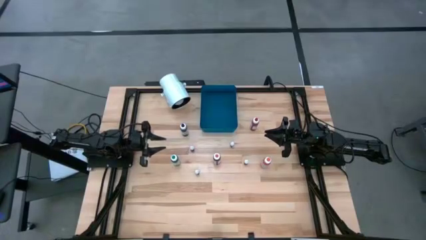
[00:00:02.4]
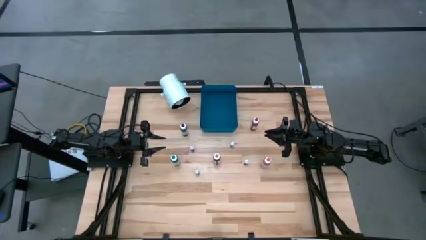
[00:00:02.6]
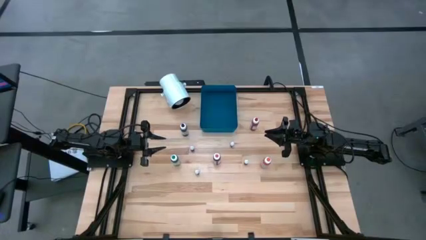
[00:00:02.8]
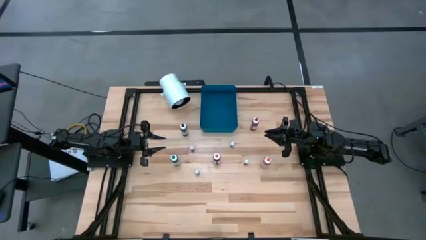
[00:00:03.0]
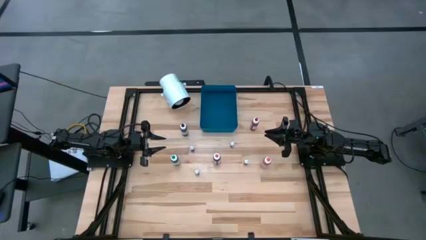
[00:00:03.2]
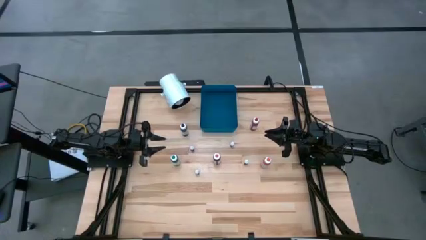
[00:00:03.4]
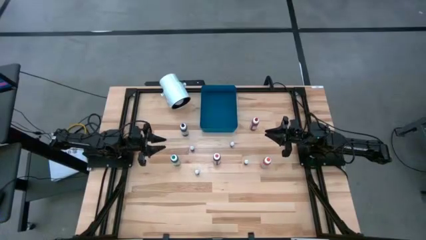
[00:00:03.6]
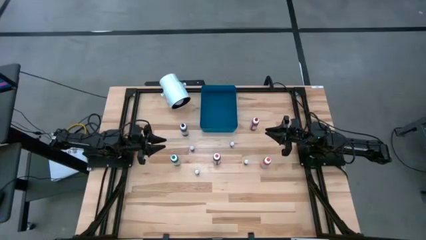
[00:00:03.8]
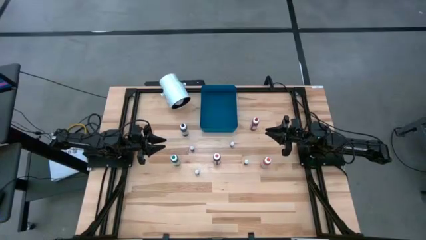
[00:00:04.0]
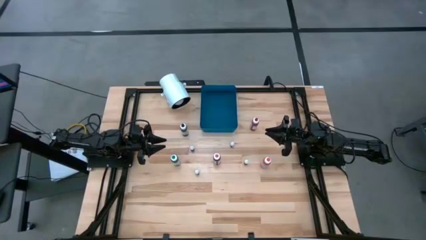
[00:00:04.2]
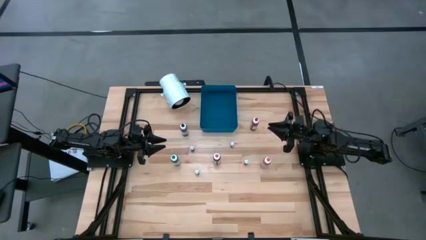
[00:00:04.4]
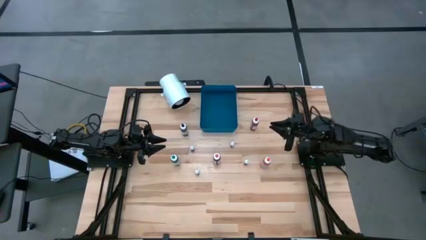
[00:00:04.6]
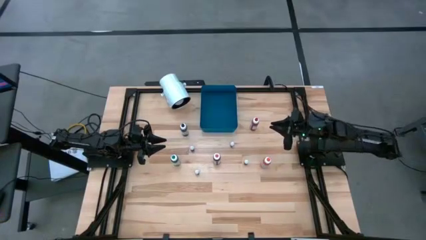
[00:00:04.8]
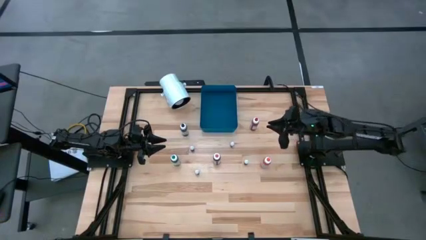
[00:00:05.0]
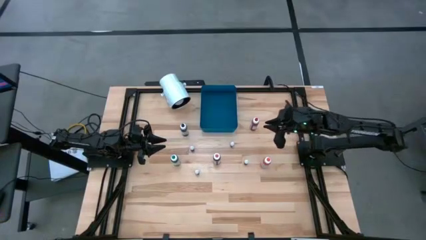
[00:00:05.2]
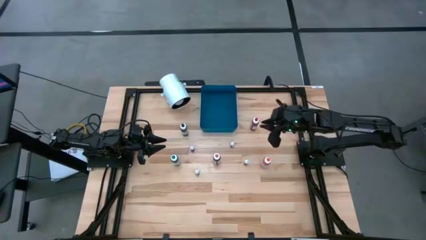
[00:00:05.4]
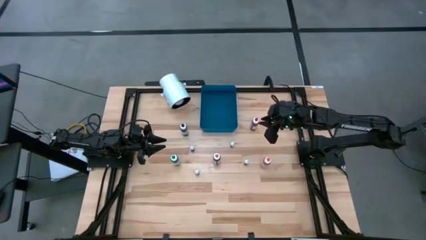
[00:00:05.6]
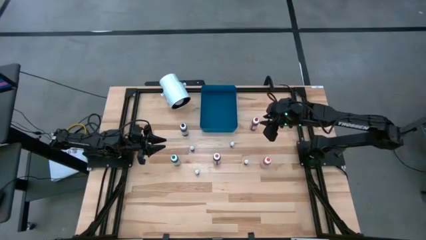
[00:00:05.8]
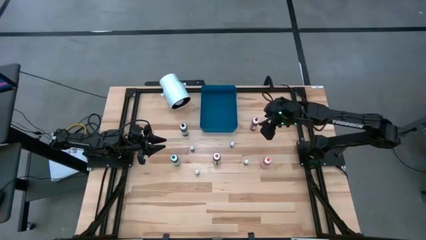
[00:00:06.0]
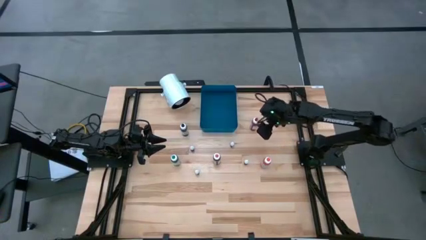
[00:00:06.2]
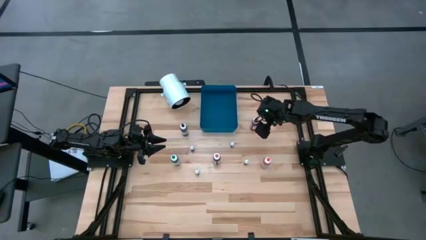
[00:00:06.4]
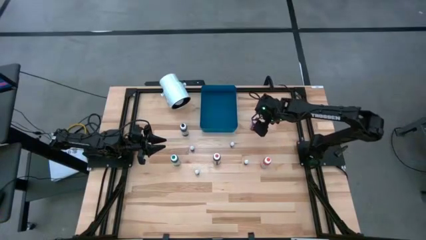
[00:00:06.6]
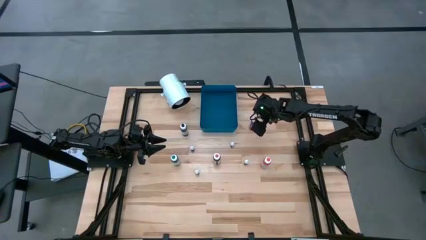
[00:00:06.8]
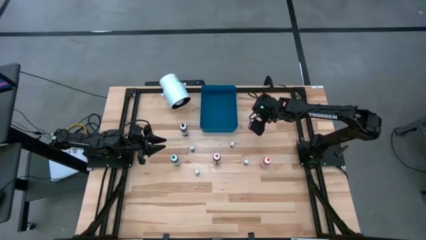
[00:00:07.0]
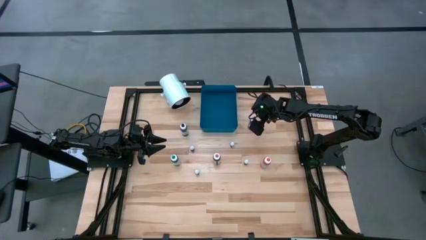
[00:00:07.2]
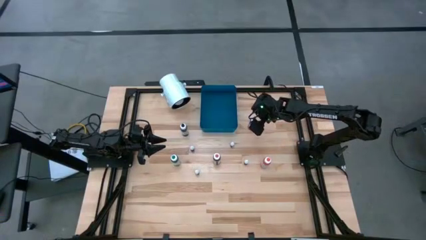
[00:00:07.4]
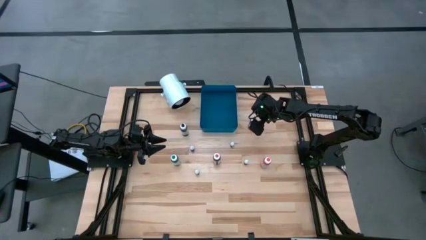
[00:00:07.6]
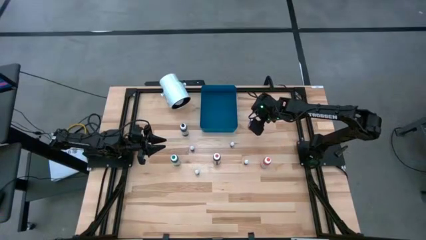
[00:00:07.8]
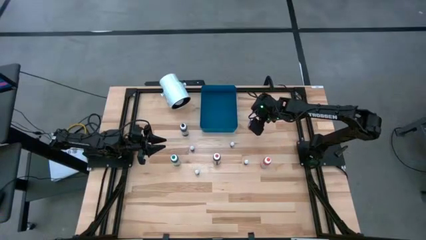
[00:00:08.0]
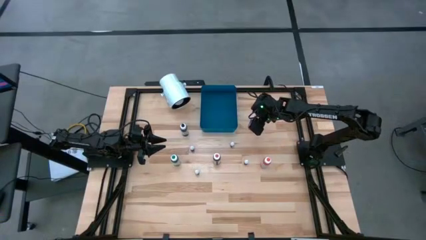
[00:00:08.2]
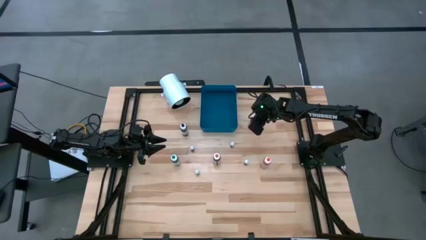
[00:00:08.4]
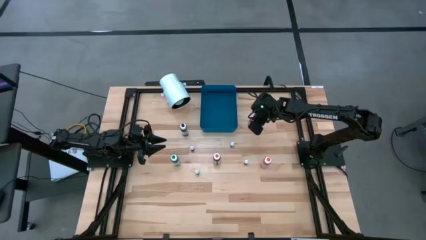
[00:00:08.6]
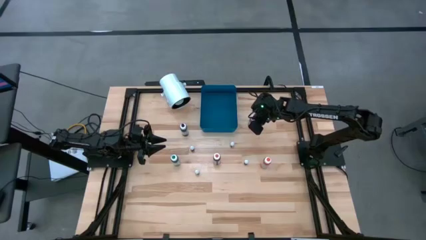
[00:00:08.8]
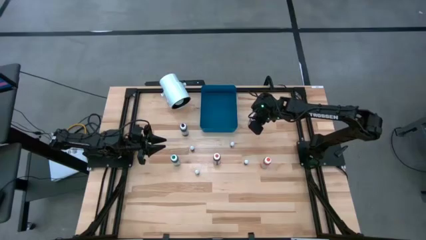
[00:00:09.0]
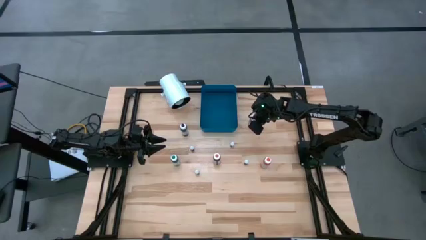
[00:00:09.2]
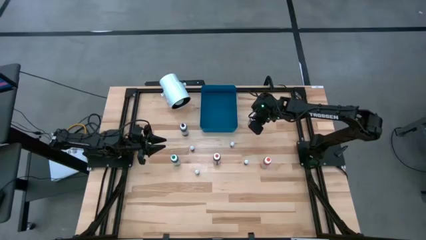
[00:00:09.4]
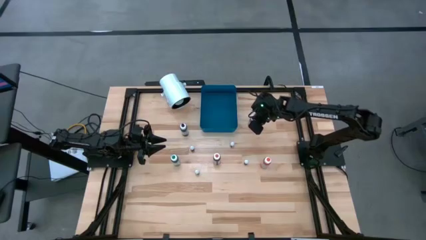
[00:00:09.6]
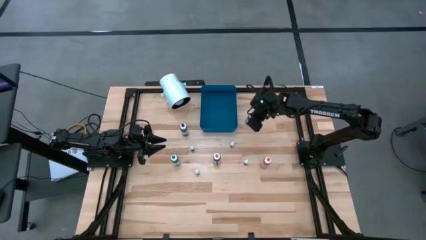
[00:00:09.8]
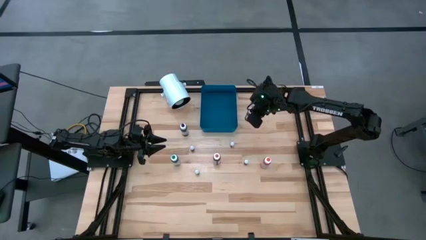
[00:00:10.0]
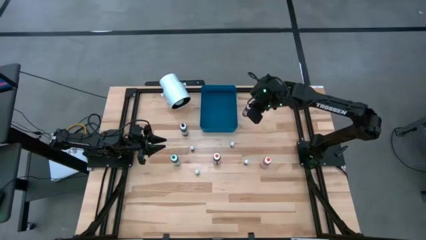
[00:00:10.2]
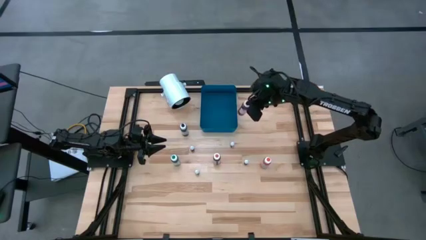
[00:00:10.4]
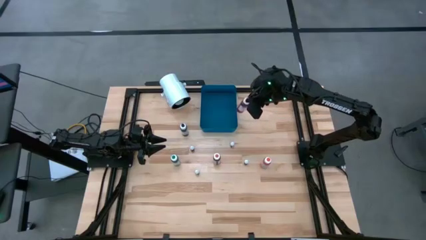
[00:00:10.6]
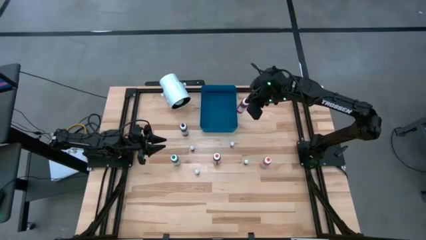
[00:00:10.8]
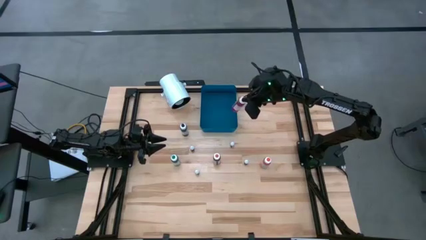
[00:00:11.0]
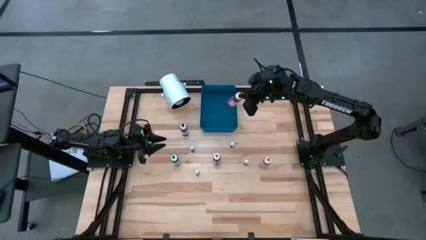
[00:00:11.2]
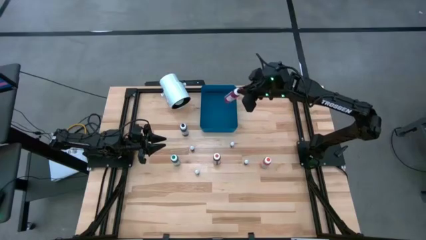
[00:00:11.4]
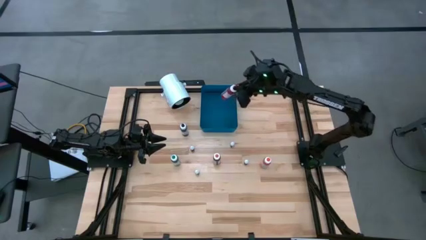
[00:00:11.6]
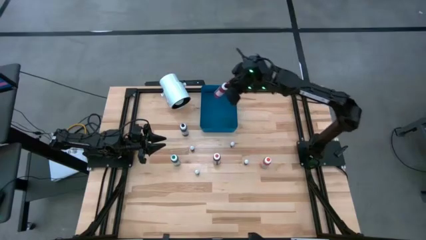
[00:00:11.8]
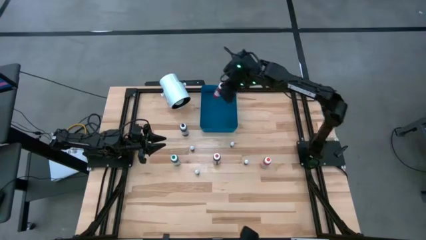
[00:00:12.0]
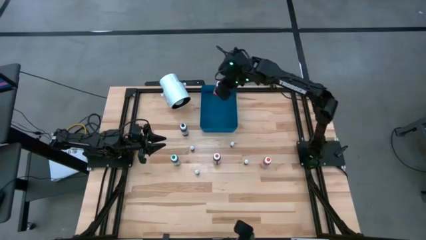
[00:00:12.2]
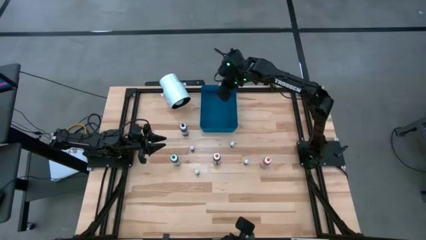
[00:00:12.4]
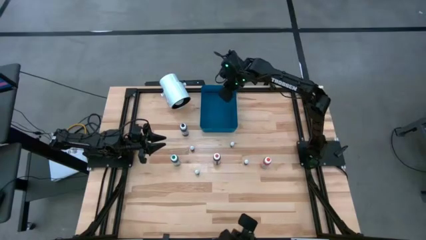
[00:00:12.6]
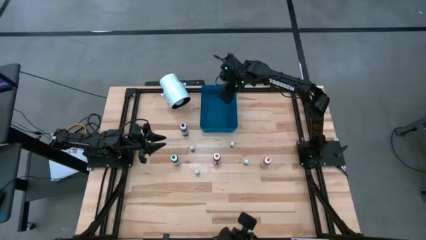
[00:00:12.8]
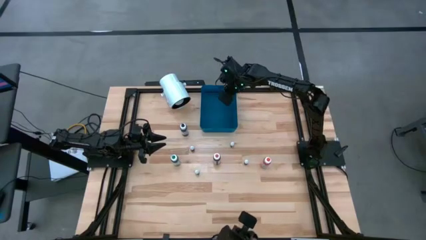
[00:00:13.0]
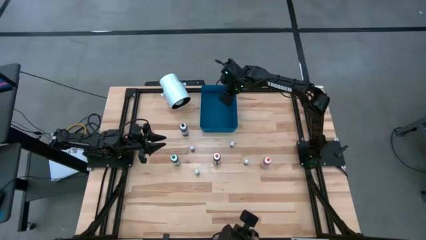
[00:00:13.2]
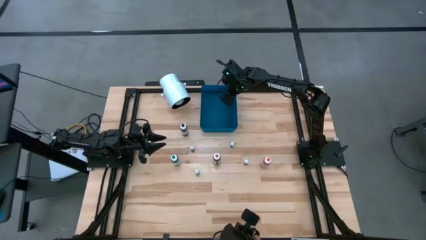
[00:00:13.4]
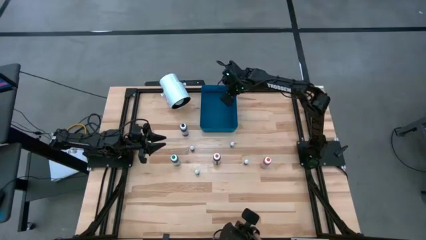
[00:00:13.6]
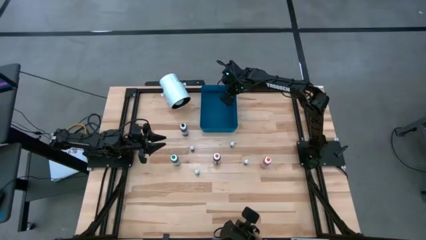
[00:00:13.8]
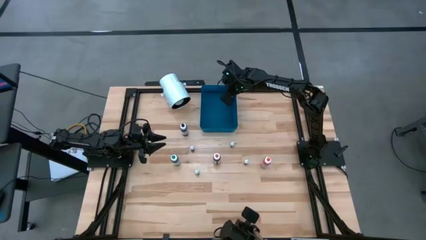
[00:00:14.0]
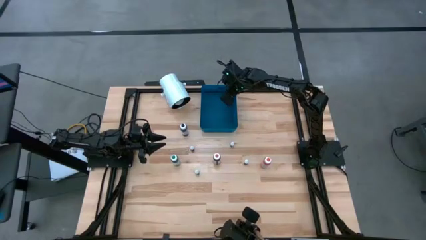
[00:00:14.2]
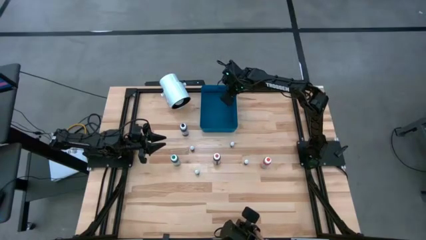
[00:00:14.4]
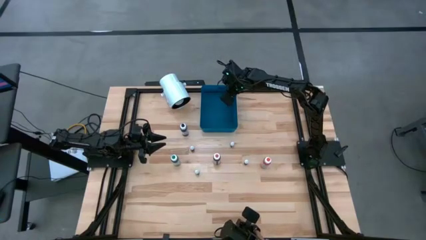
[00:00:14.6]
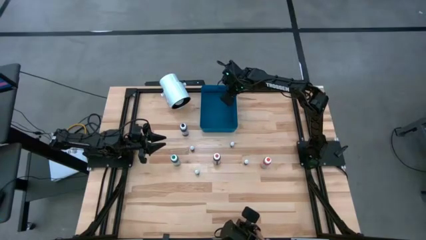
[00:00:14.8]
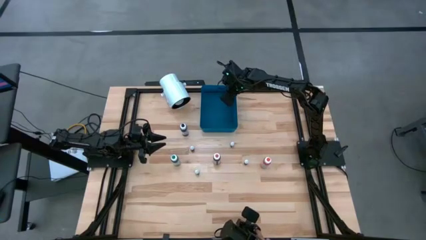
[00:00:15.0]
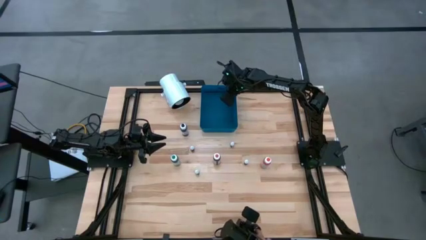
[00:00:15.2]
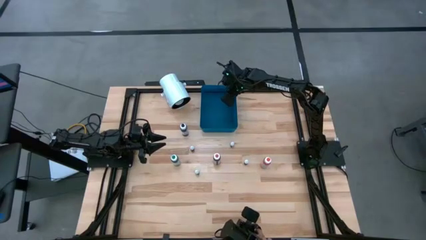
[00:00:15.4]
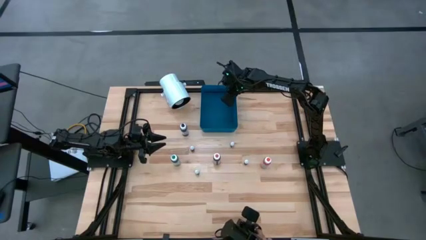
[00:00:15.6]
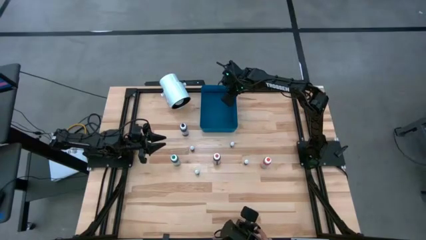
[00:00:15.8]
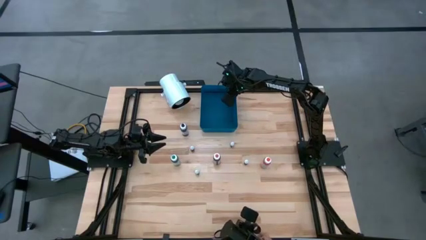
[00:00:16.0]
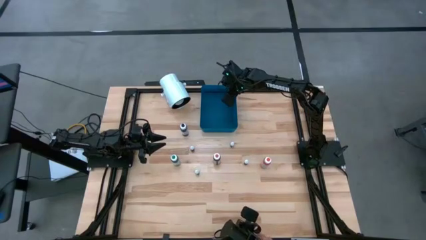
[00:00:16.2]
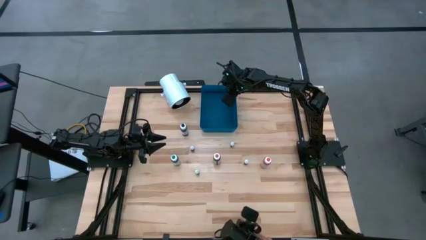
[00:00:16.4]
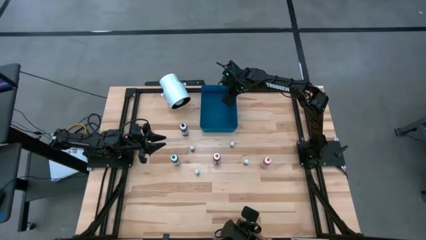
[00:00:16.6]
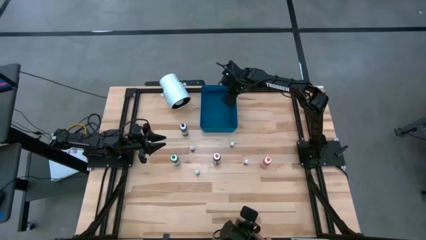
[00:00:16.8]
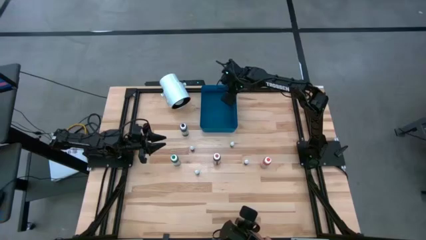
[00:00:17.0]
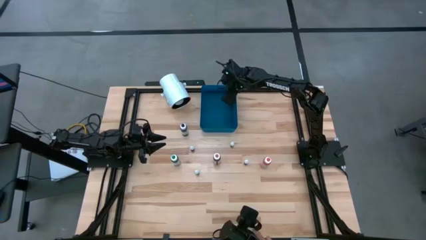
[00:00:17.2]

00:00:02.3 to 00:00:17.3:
Task: Pick & Place food coloring
Put the large red food coloring bottle into the blue bin
